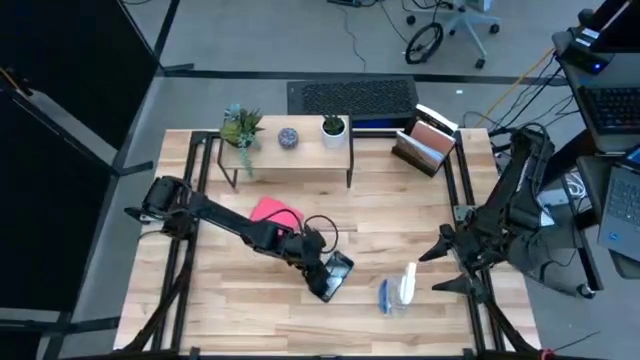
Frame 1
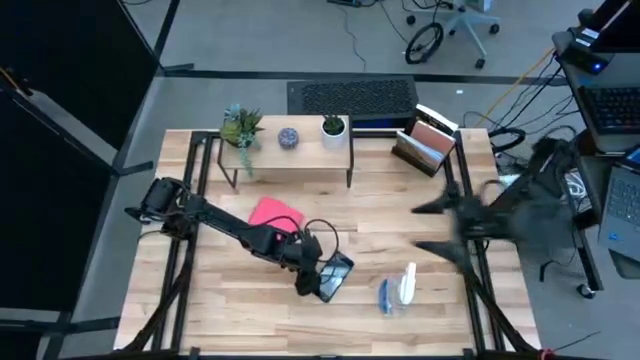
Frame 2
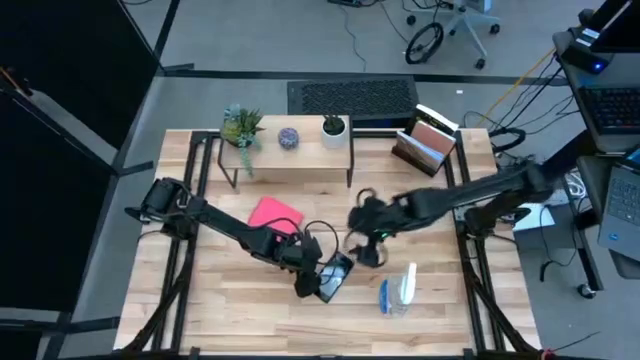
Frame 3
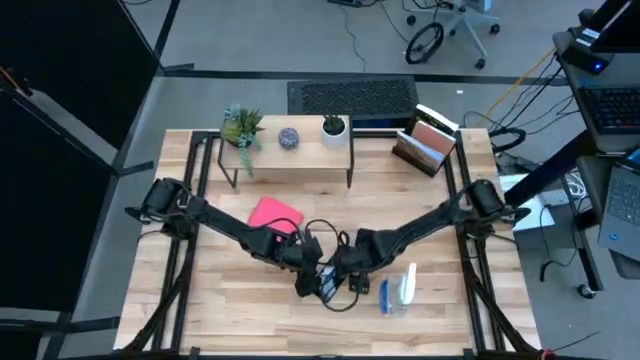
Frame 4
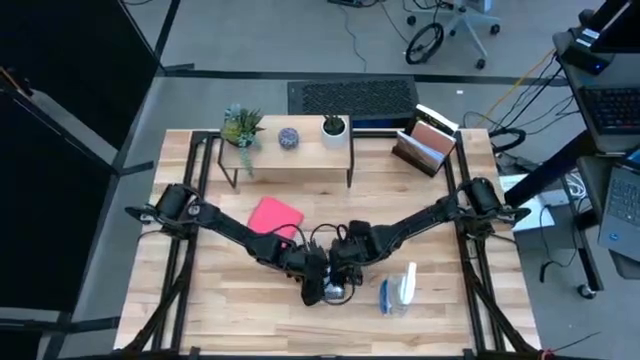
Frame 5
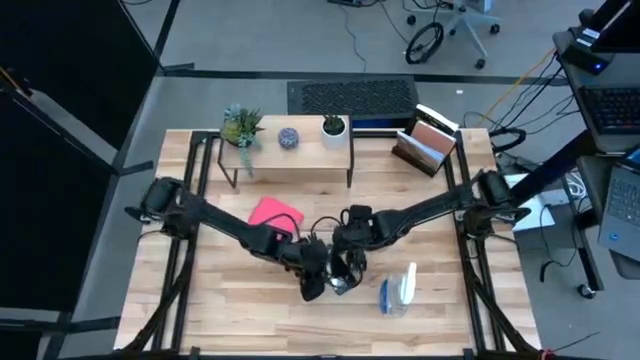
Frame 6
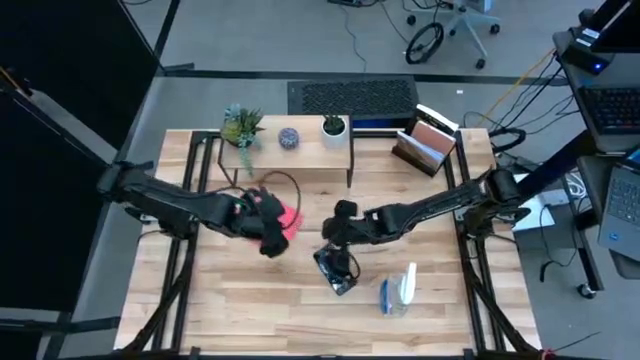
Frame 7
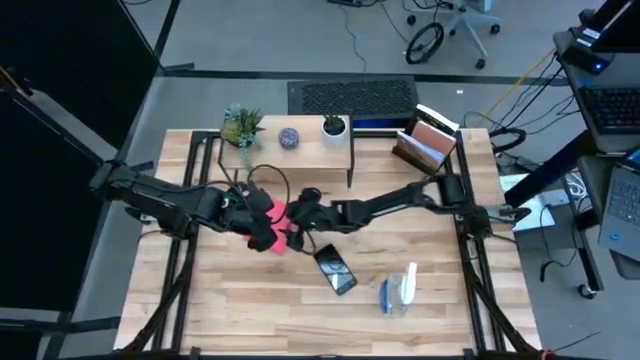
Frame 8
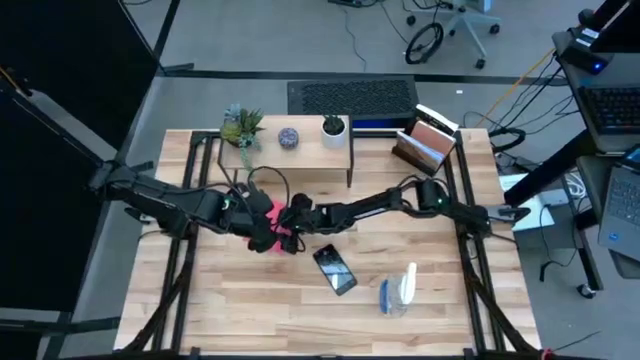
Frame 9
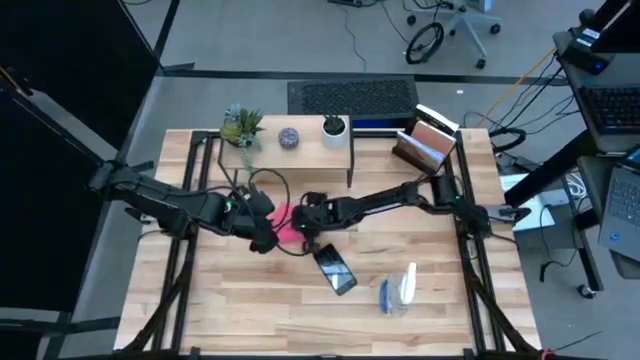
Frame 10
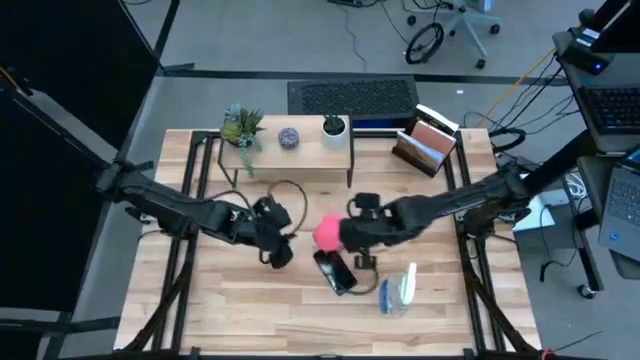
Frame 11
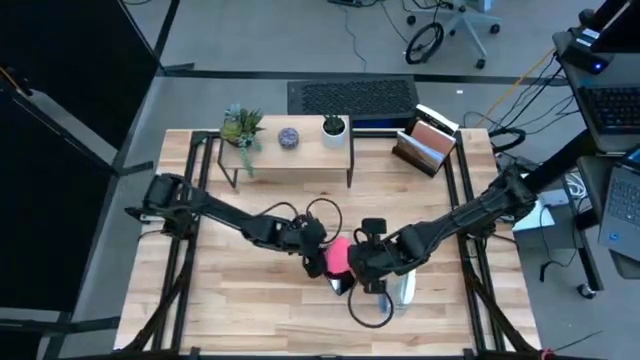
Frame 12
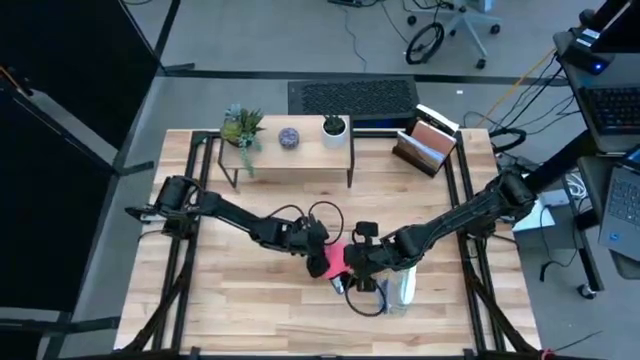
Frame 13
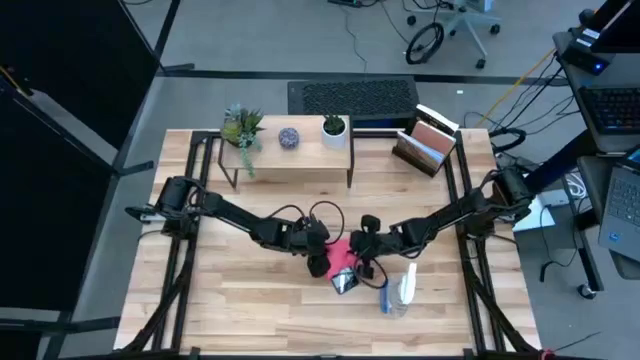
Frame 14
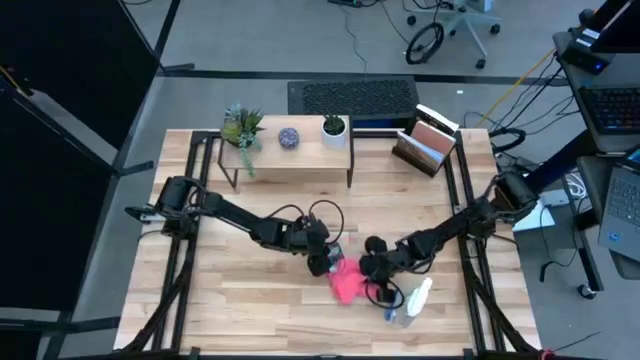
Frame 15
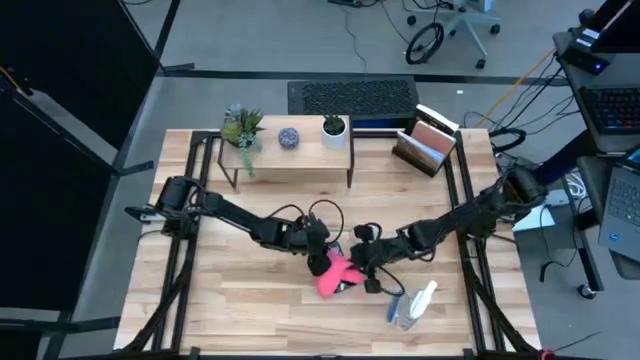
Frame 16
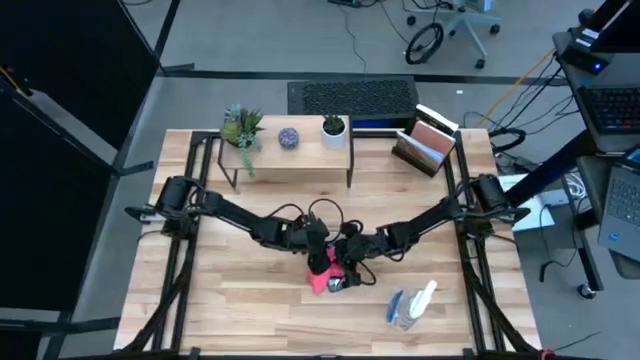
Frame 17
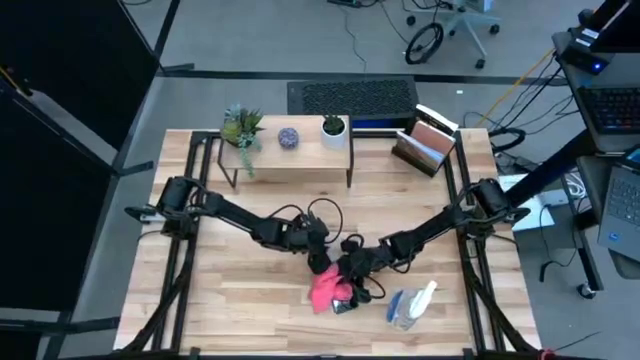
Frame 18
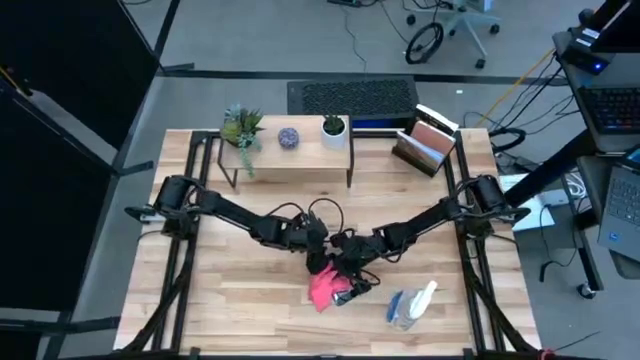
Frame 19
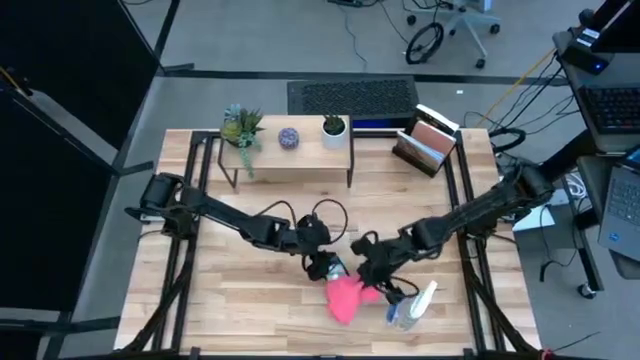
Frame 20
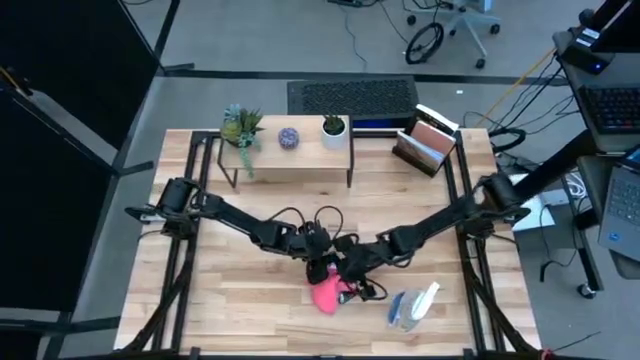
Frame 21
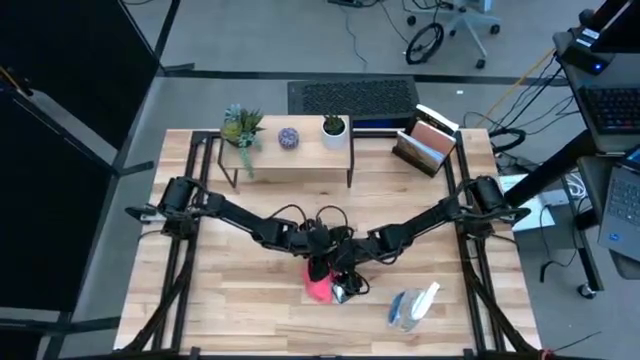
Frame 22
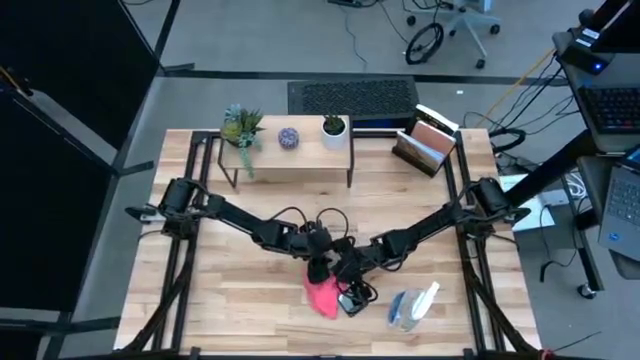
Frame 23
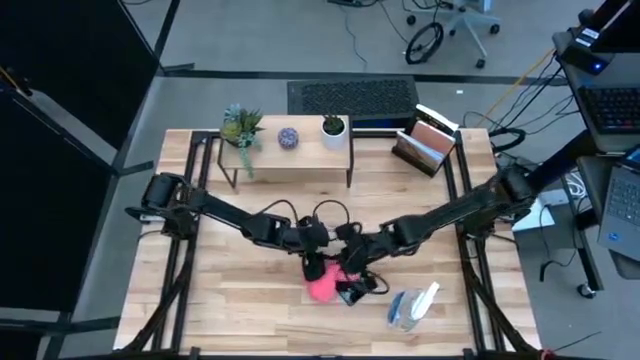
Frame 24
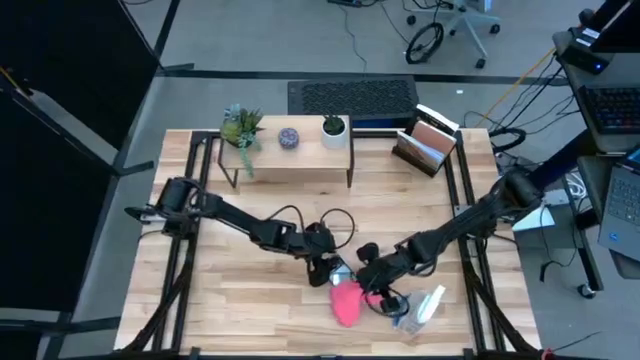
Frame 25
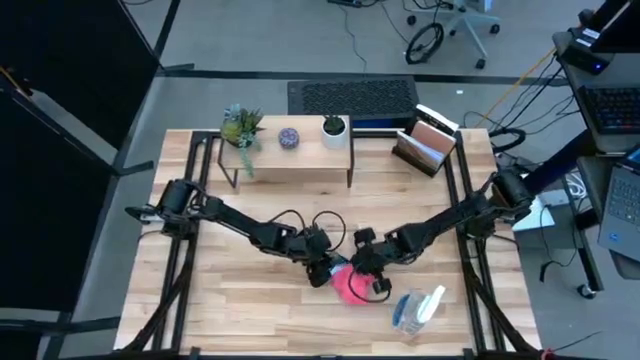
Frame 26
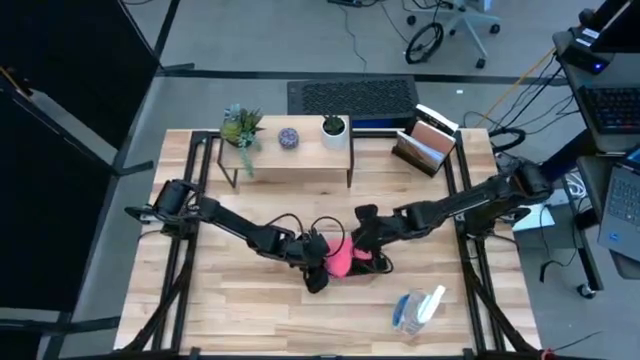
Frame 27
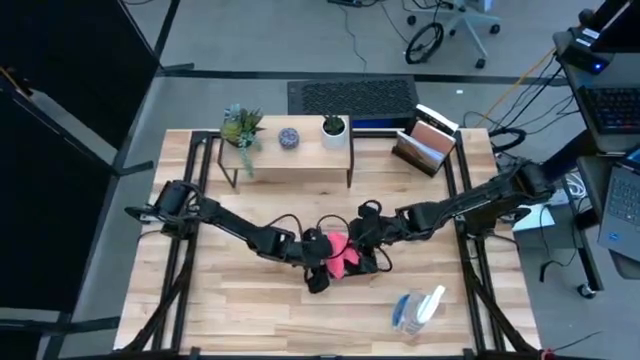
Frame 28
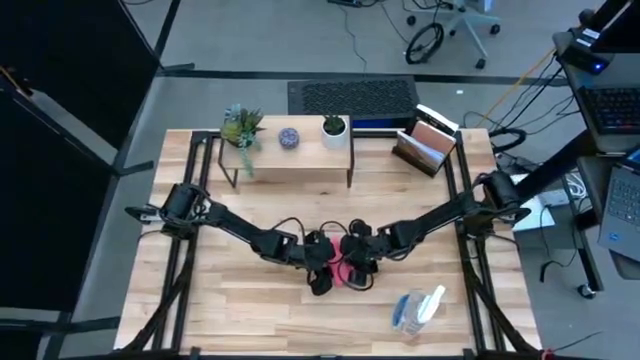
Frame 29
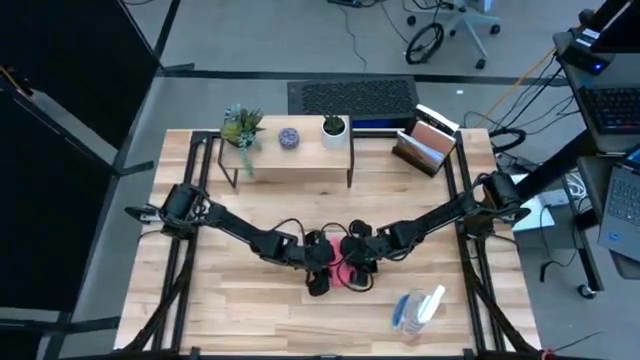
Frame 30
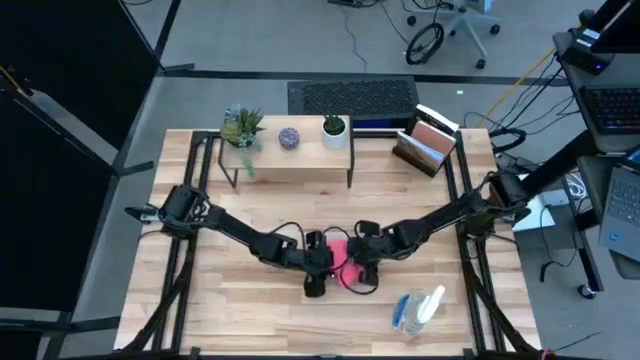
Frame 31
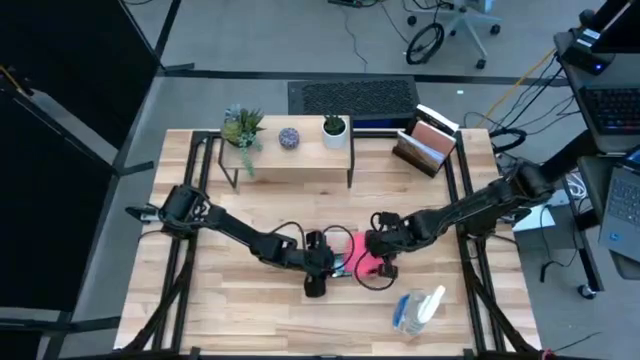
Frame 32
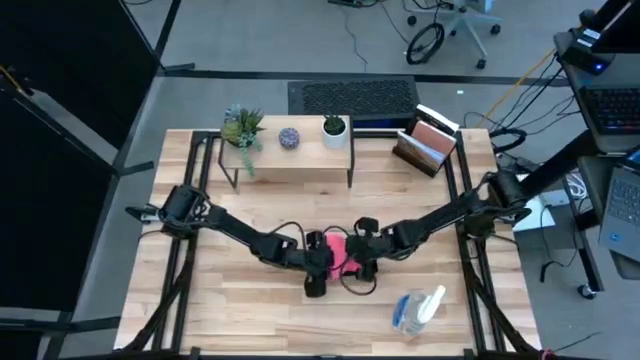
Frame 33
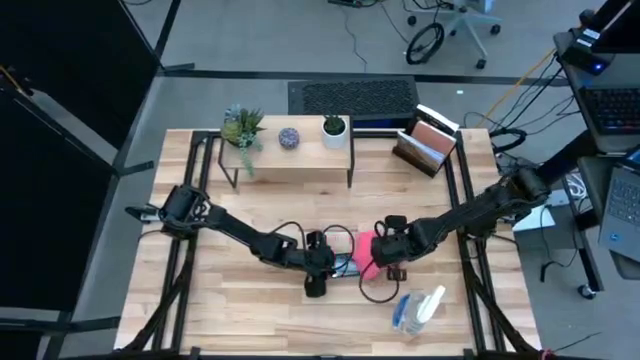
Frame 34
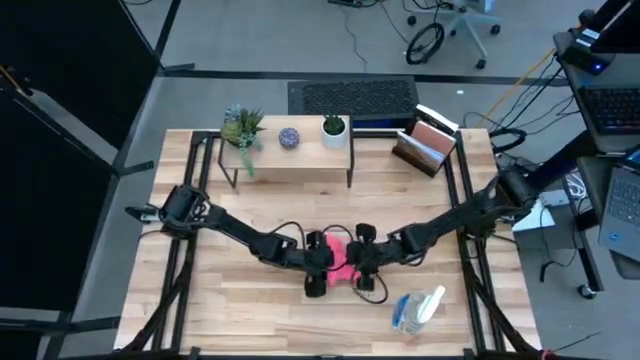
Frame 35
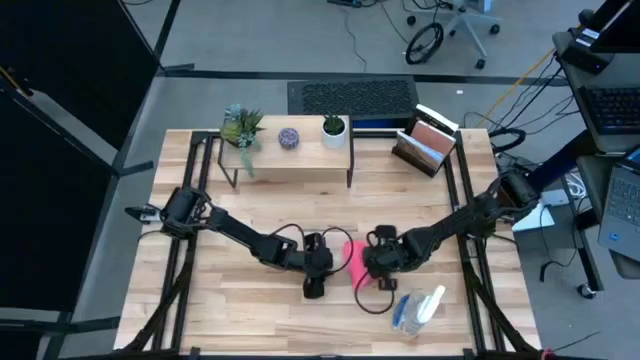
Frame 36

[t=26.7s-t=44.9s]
Task: Apply microfiber cloth
Wipe the front of the cellphone using the pink microfiber cloth

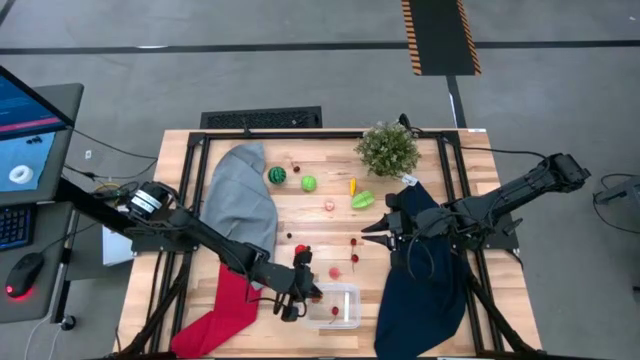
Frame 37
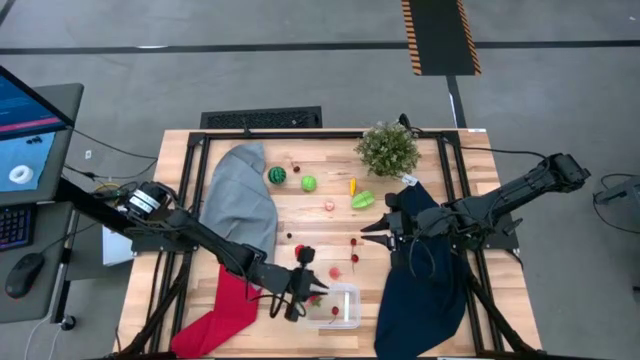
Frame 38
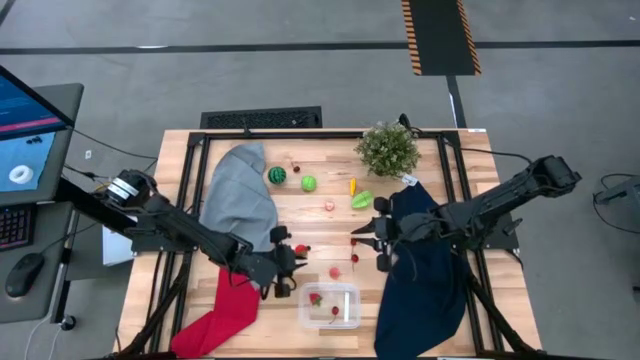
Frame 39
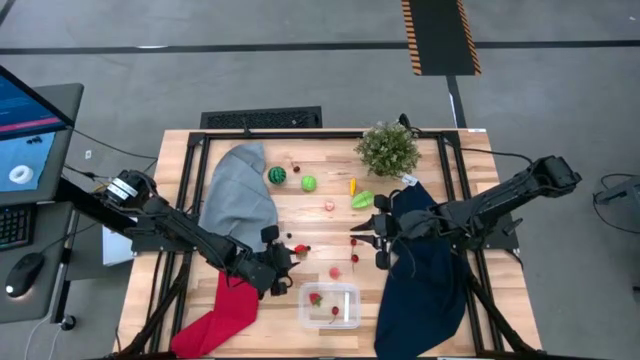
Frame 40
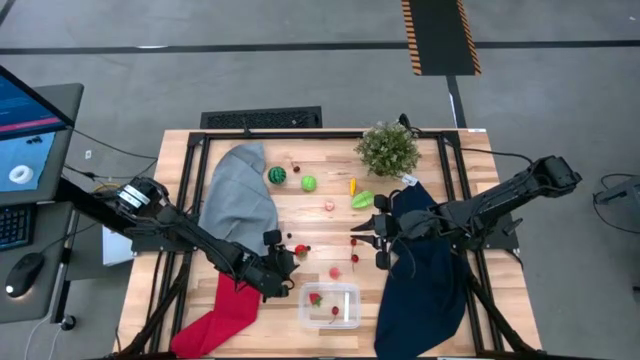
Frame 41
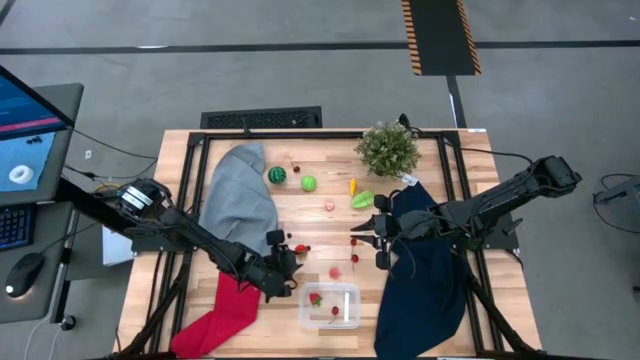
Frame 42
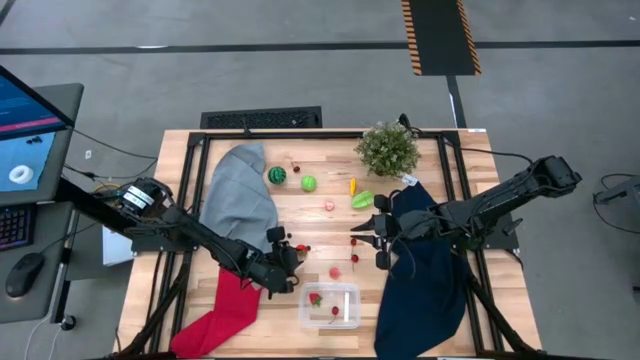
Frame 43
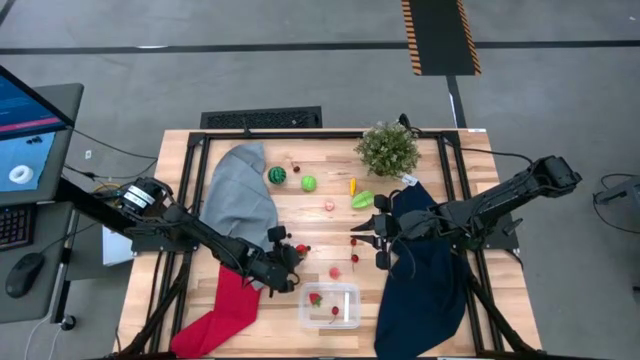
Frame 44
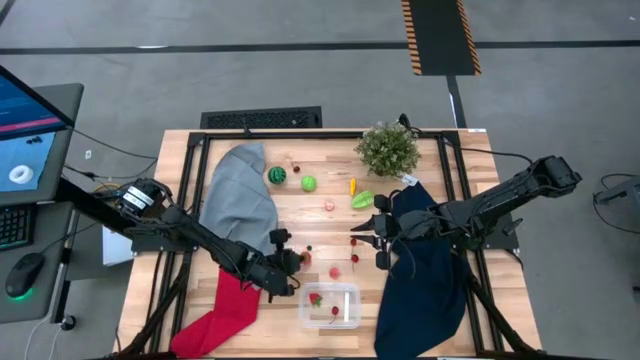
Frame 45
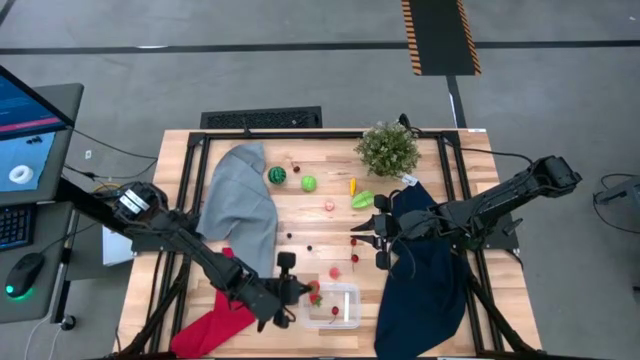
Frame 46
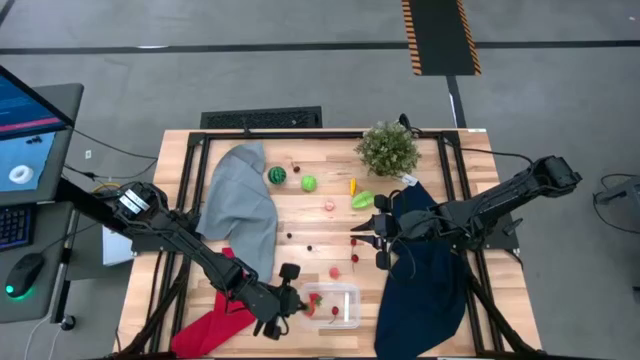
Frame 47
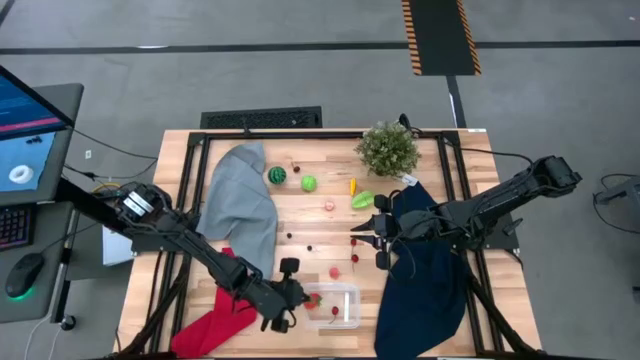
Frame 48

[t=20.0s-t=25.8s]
Task: Pick and placing Produce into tupperware
Put the strawberry into the transparent bin
